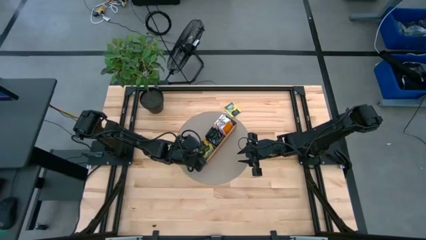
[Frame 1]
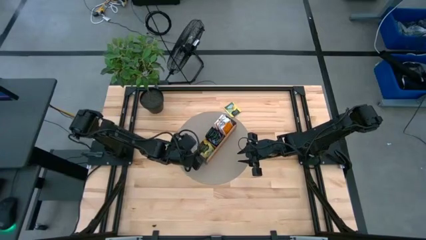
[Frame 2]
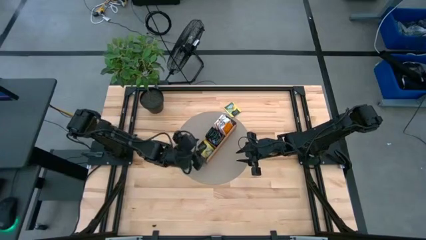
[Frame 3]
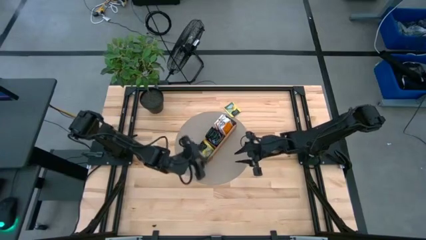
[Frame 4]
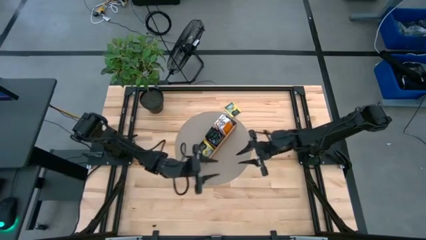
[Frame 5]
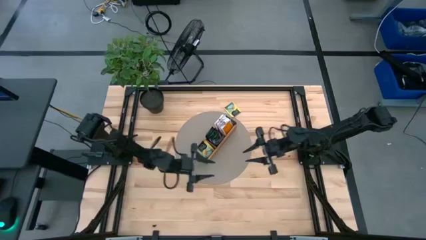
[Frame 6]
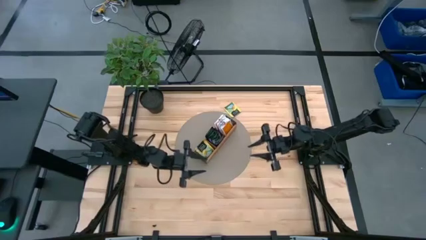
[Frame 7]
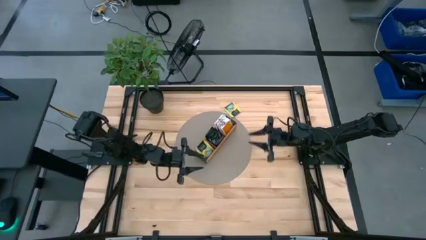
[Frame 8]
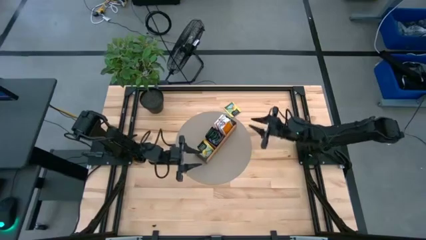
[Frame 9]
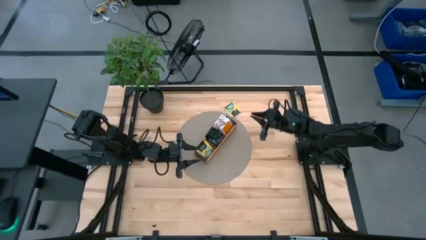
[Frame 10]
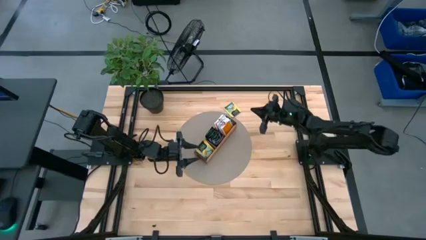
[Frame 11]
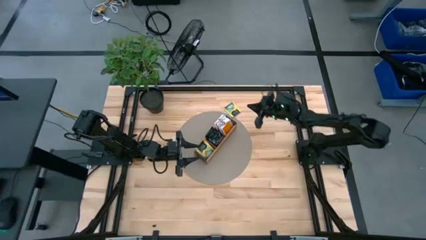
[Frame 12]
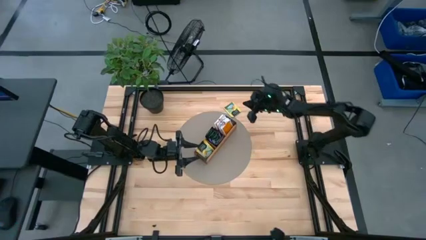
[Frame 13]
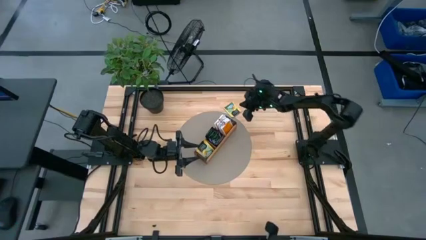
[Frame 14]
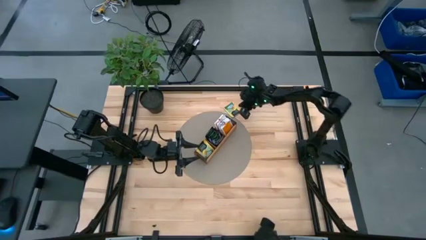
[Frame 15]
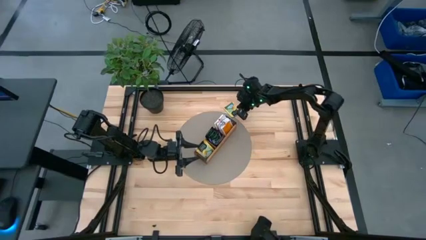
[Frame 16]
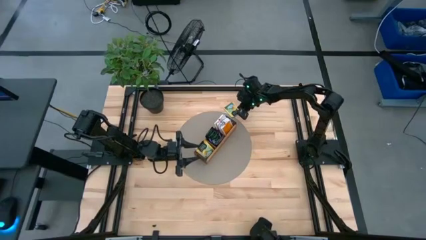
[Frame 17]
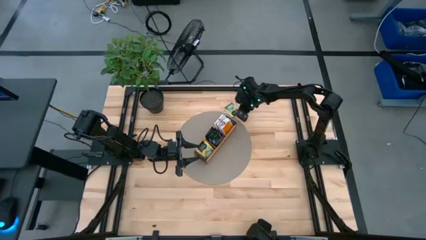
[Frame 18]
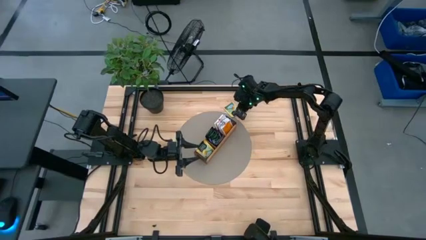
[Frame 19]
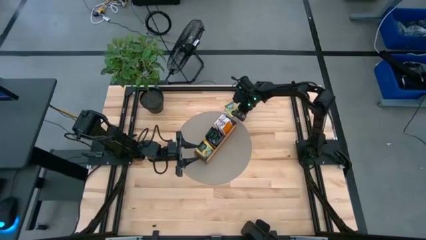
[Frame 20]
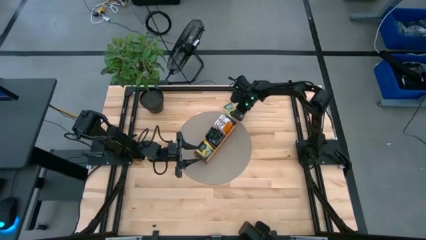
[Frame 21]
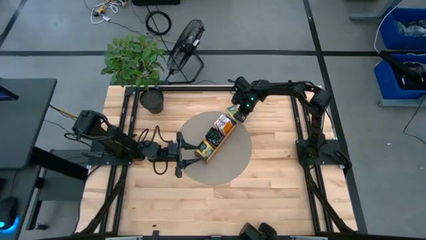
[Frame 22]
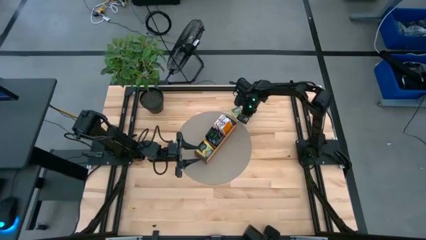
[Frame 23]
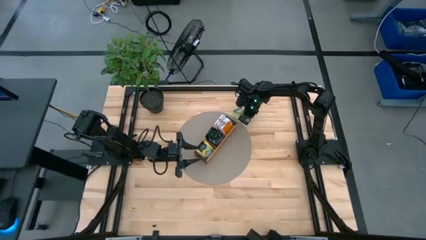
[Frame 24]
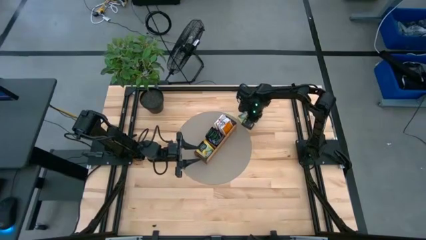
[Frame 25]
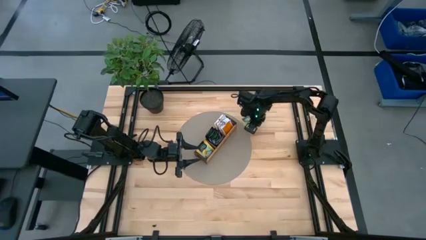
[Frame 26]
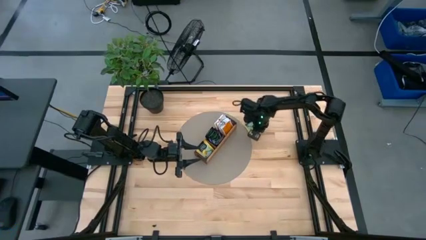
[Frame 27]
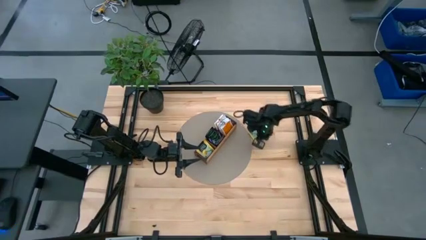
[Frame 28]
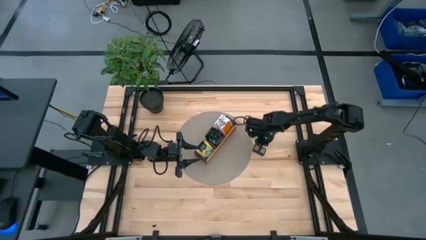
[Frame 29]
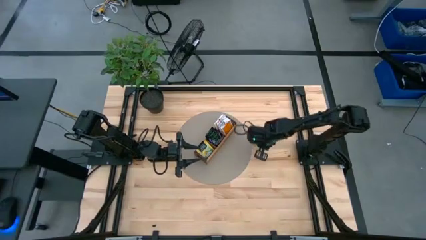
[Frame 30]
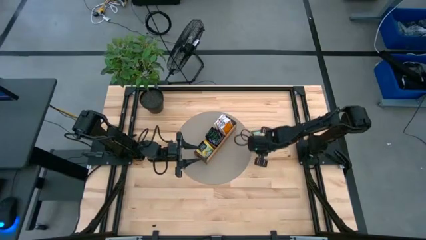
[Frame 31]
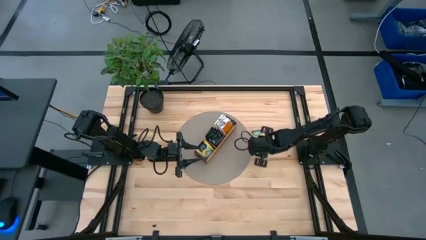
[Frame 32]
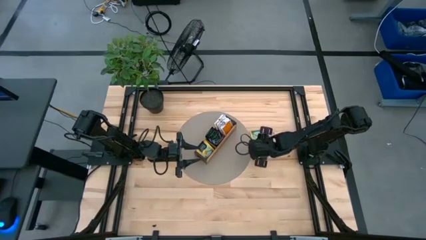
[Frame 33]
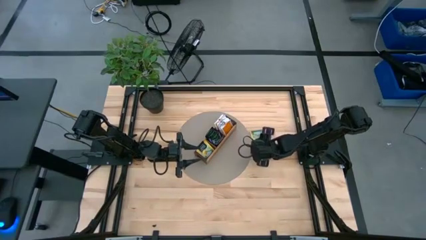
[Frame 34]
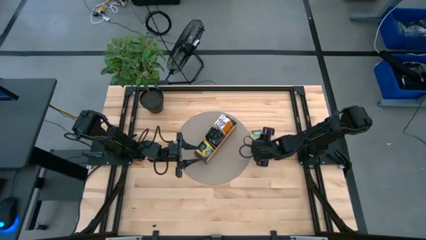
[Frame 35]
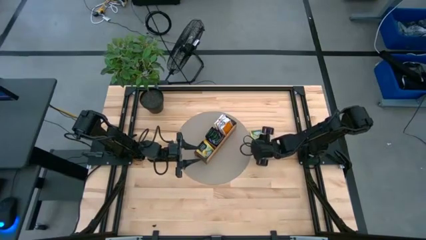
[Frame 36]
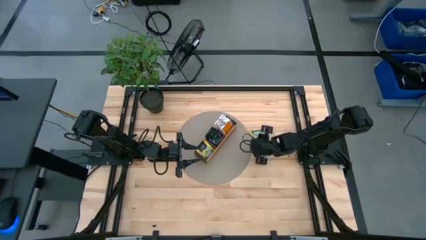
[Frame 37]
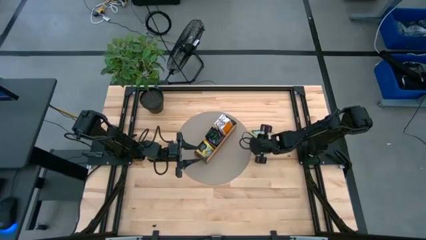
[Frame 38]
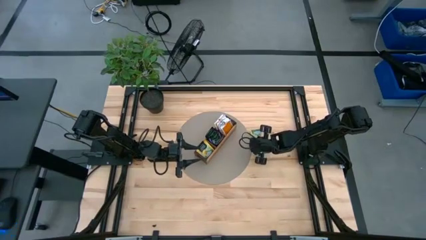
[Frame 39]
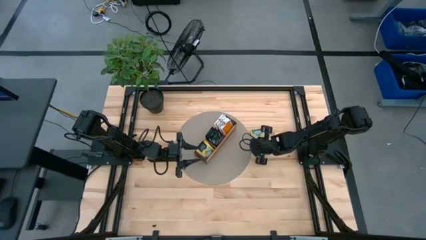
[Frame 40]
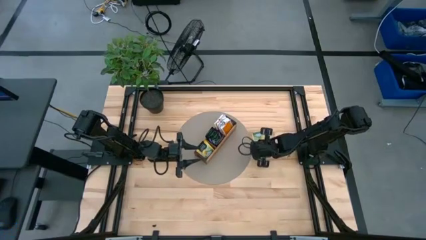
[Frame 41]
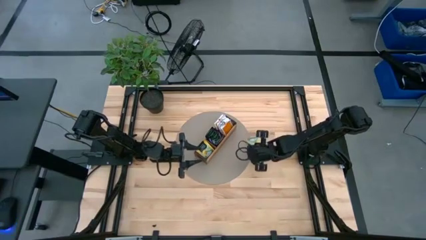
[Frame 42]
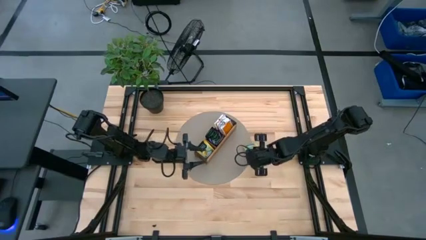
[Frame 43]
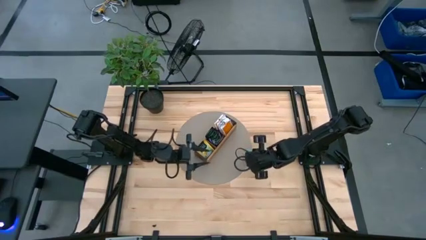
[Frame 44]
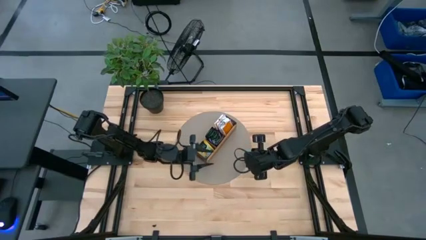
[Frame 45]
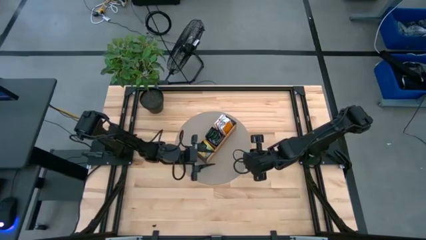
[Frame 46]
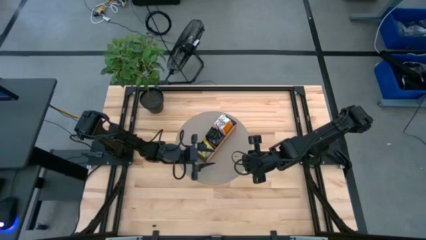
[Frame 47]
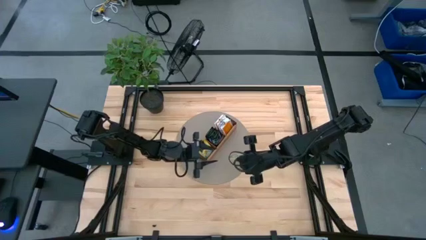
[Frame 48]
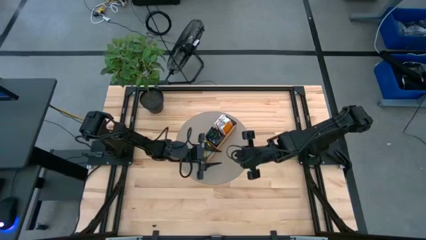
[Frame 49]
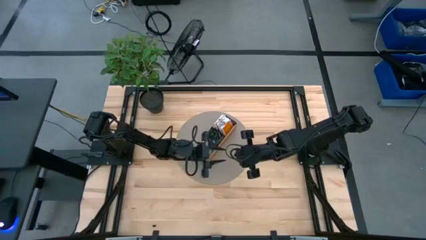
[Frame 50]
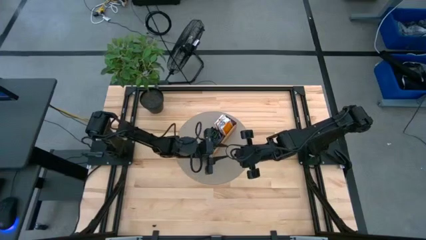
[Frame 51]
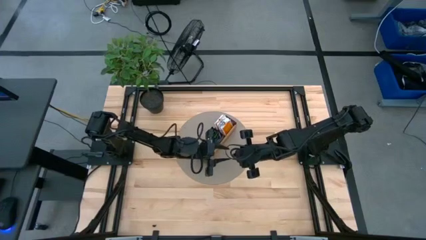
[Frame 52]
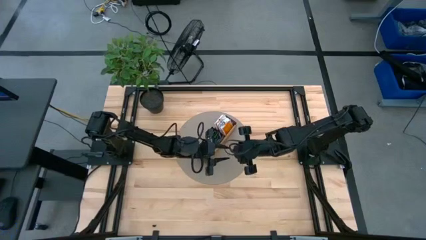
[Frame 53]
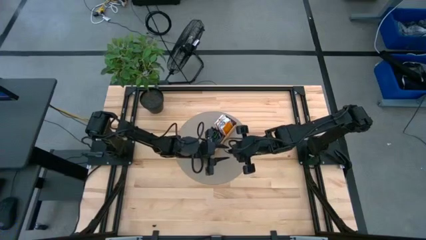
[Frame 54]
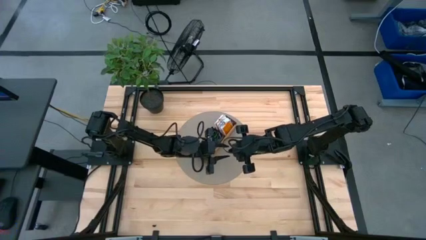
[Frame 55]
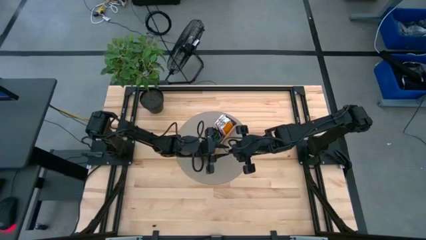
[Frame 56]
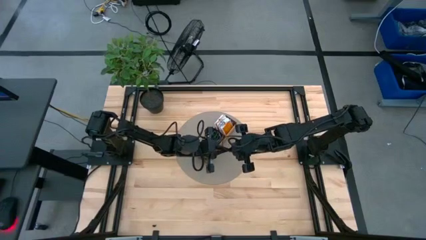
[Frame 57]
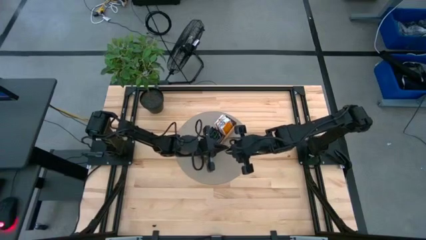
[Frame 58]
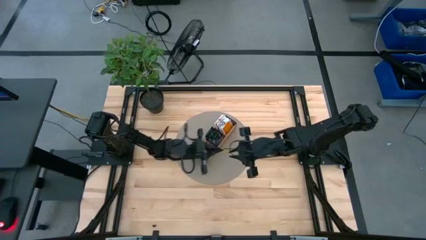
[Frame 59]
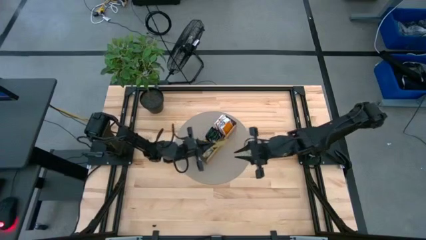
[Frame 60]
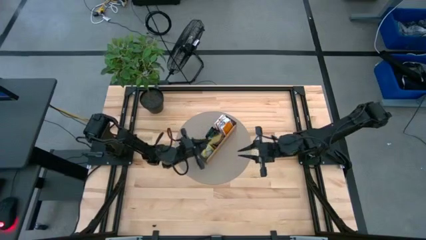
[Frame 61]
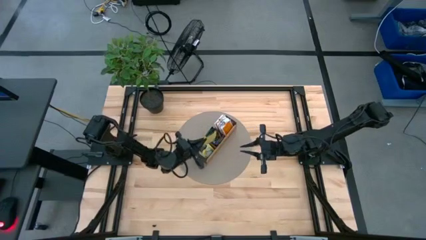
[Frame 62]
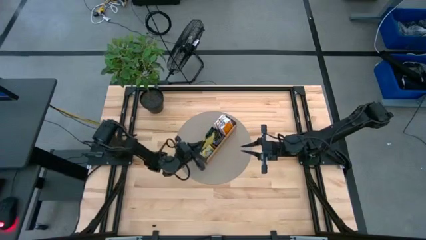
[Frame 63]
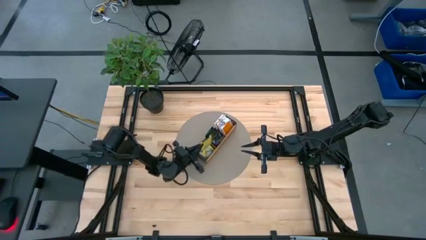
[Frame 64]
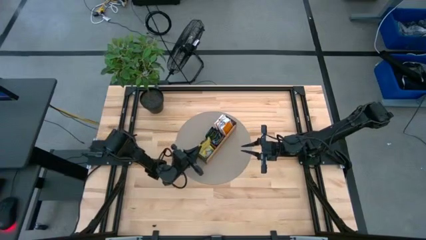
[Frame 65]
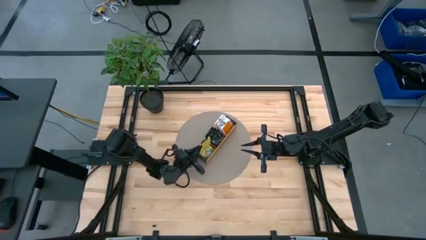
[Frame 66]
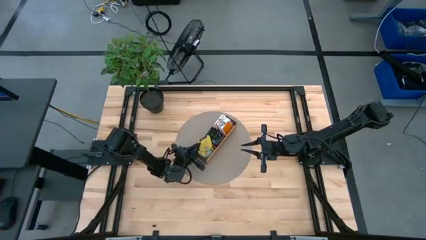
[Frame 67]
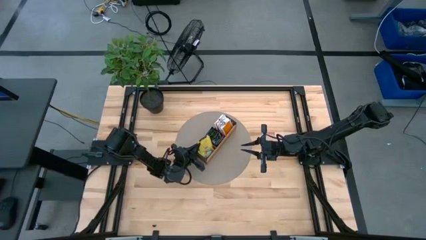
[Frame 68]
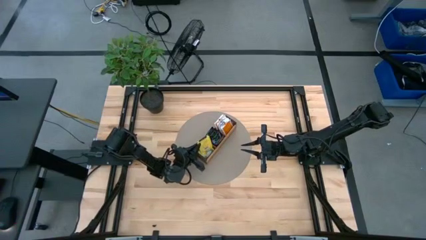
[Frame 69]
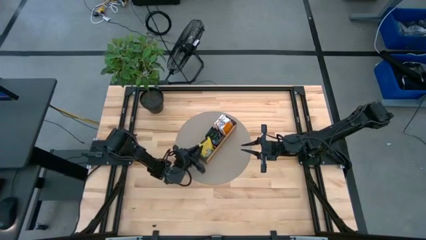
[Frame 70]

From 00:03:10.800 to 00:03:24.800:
Task: Pick & Place Tea
Put the yellow tea bag into the left section of the wooden organizer
